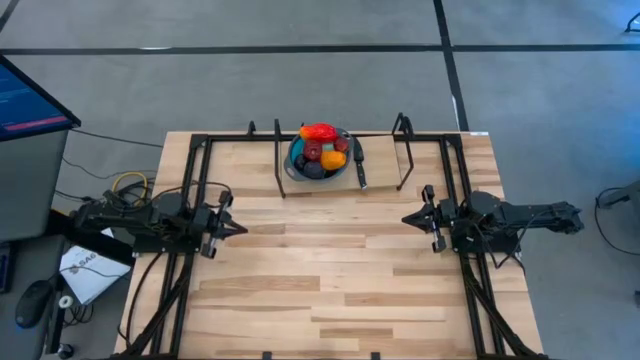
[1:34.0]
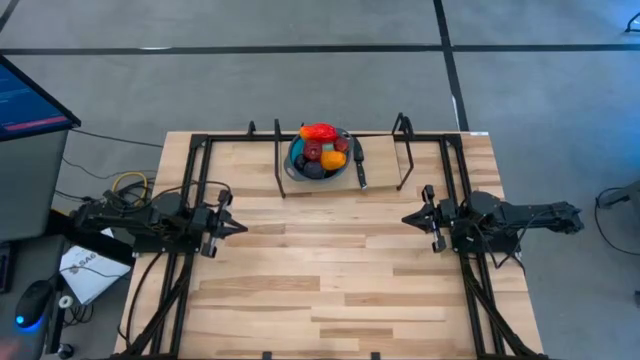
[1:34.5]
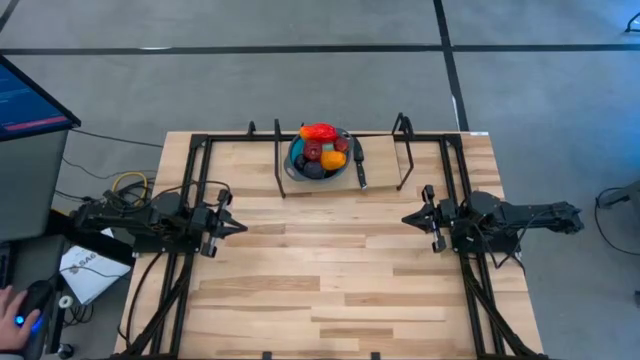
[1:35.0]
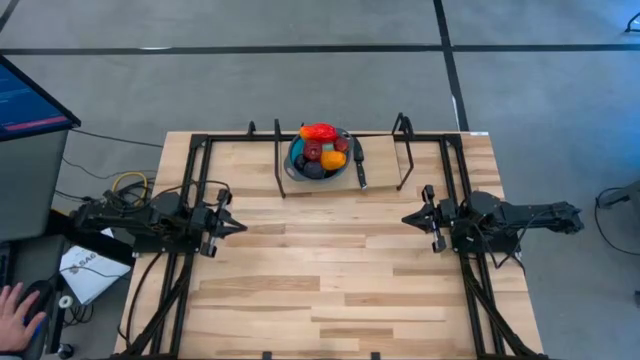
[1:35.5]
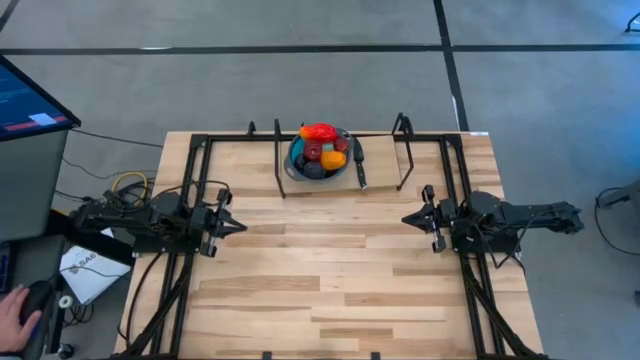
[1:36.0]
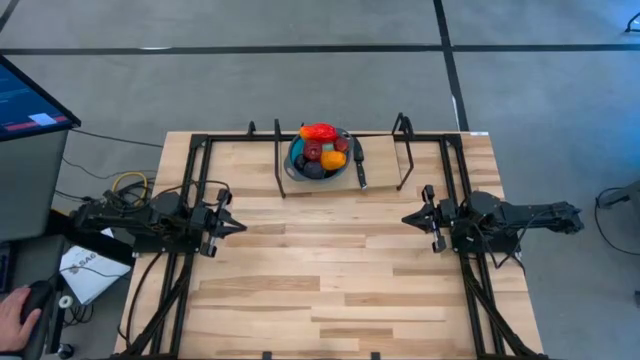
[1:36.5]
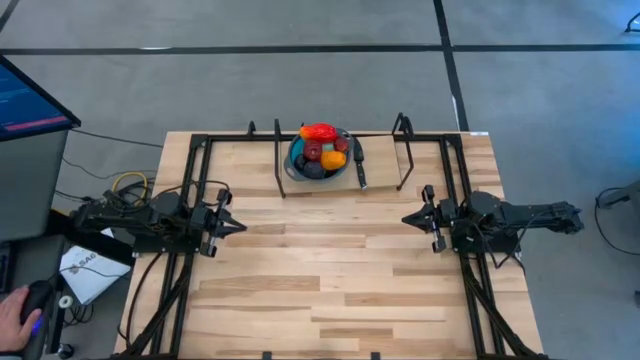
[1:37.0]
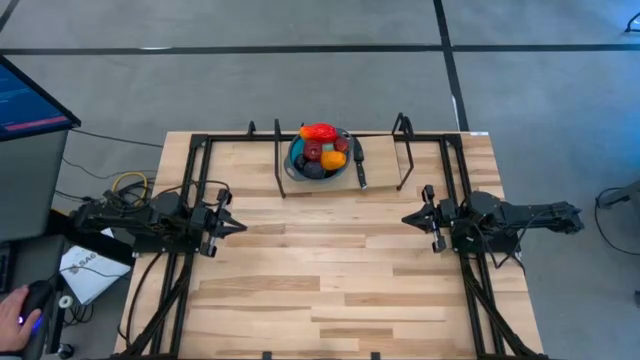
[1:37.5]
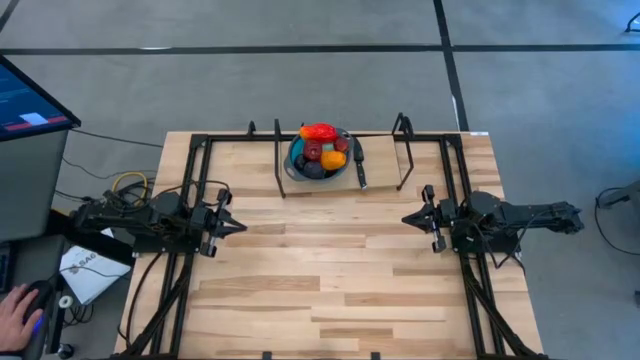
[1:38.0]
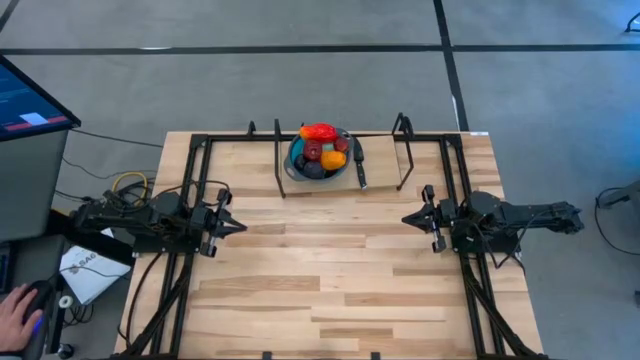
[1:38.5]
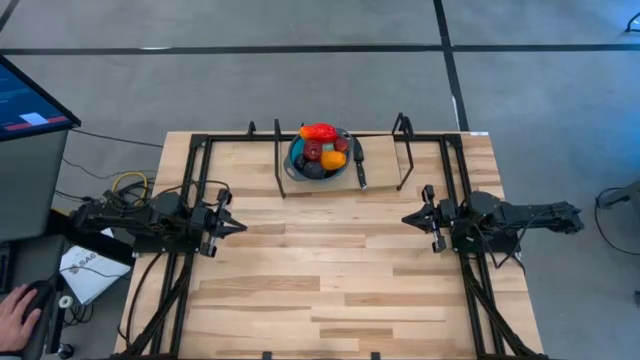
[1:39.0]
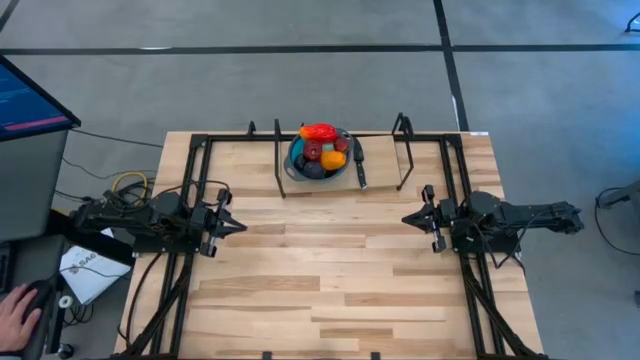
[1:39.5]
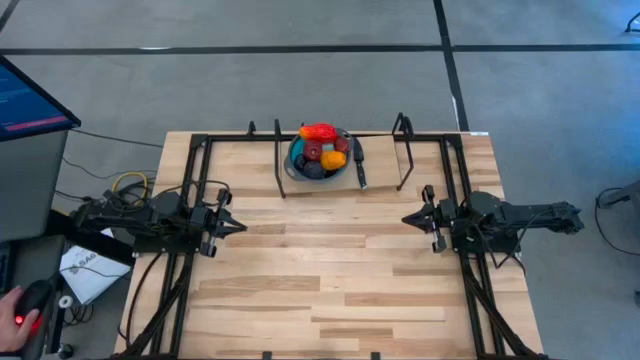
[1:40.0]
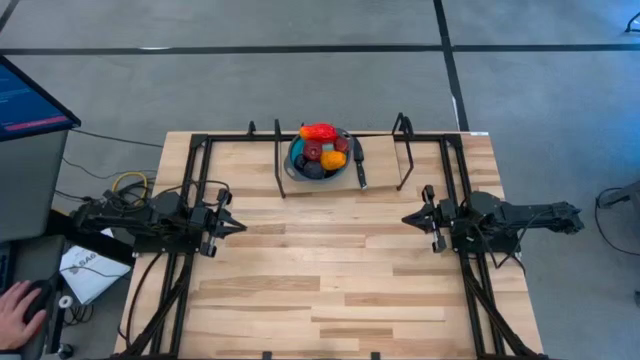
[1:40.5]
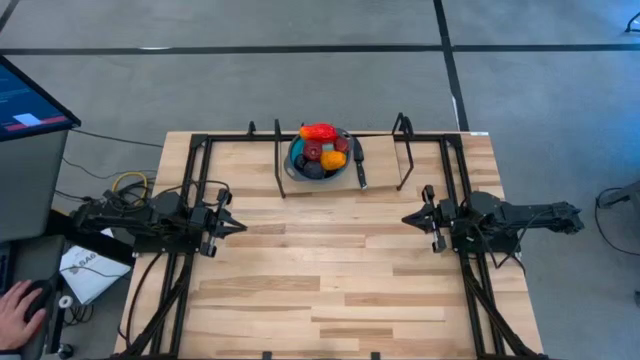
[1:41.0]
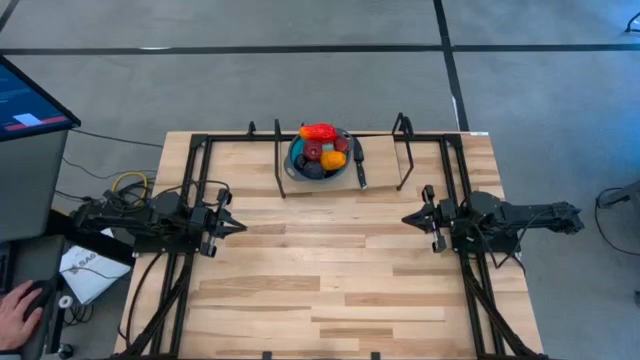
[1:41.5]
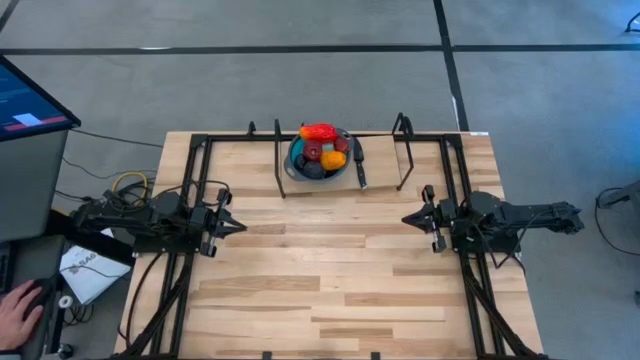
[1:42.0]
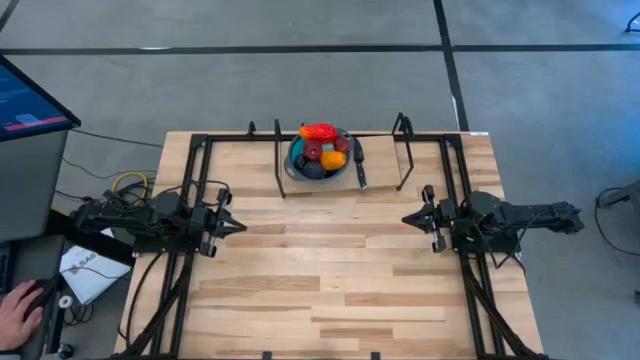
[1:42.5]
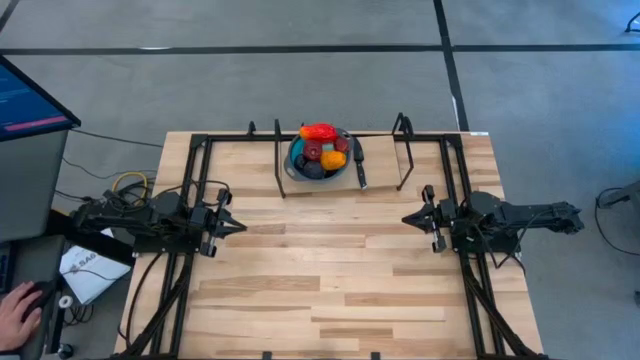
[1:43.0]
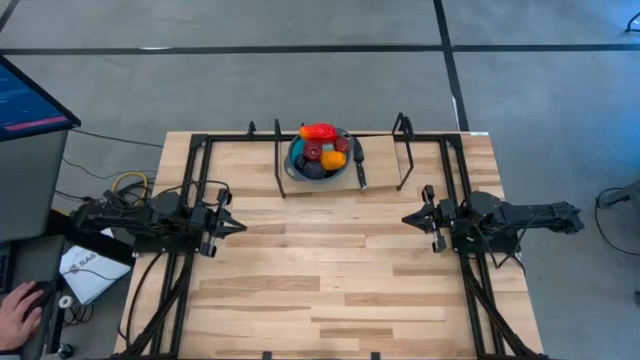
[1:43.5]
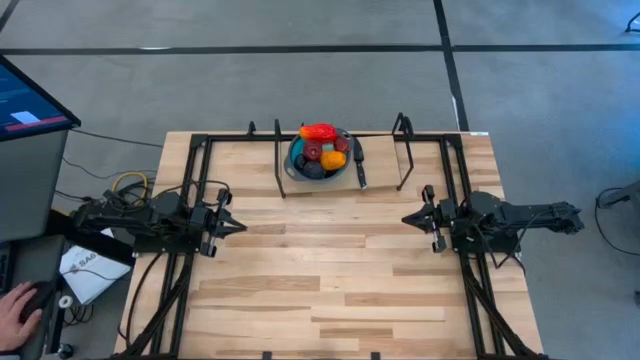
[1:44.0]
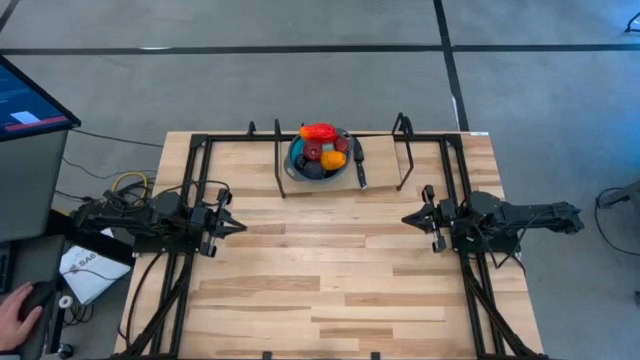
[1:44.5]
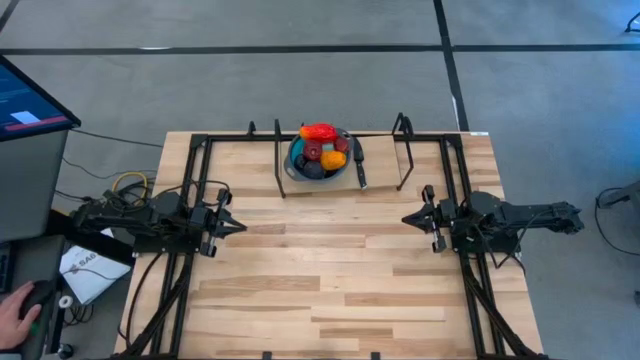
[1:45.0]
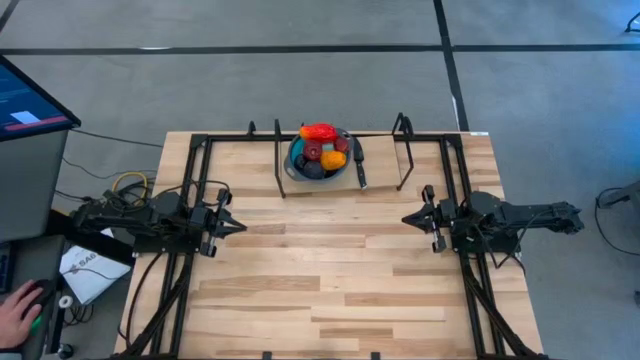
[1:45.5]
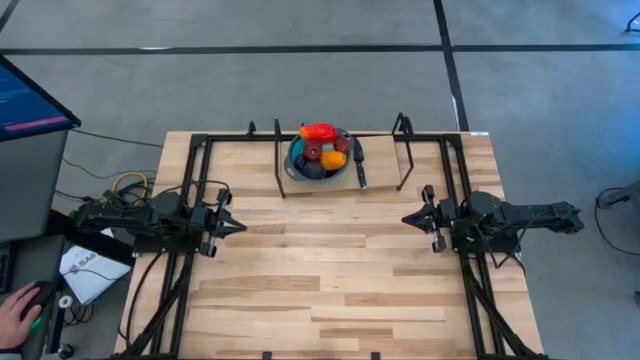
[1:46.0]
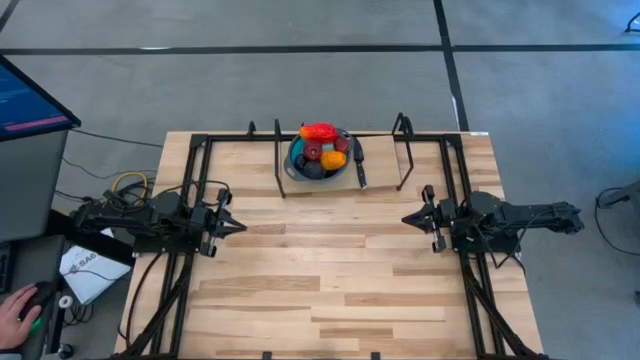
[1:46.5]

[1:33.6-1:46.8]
Task: Pick & Place Fruit
Return to Home Position

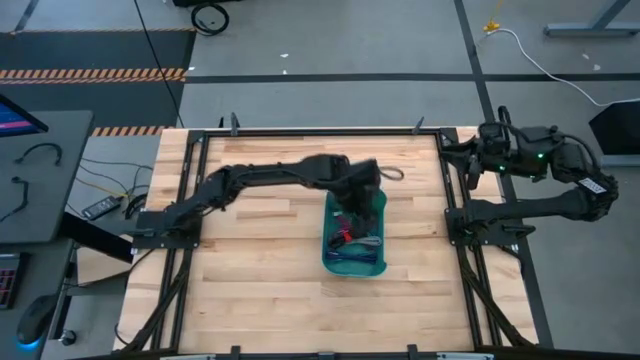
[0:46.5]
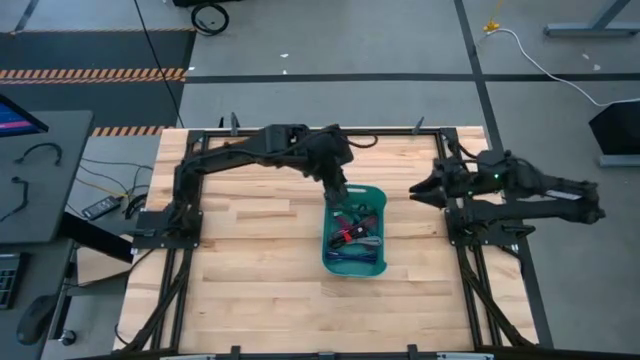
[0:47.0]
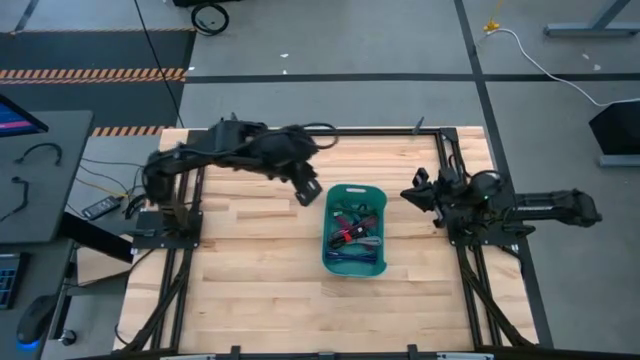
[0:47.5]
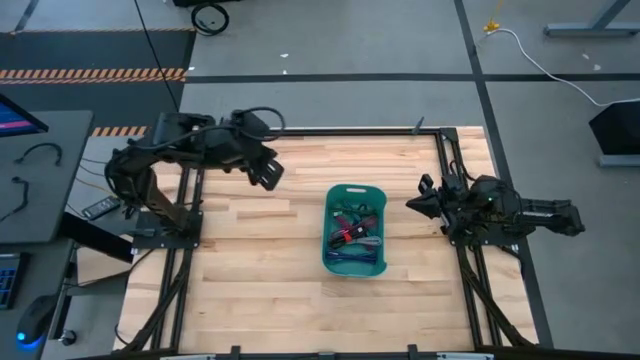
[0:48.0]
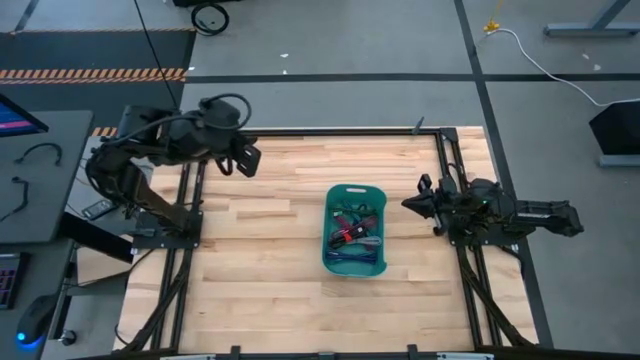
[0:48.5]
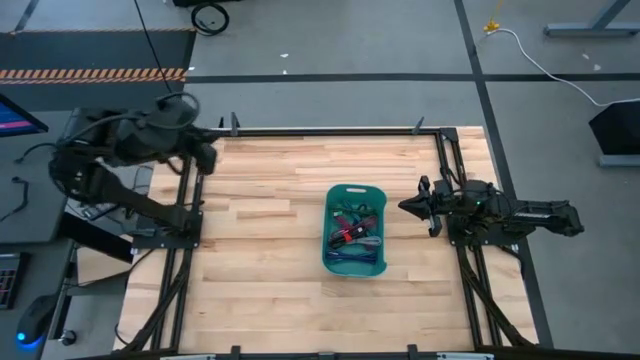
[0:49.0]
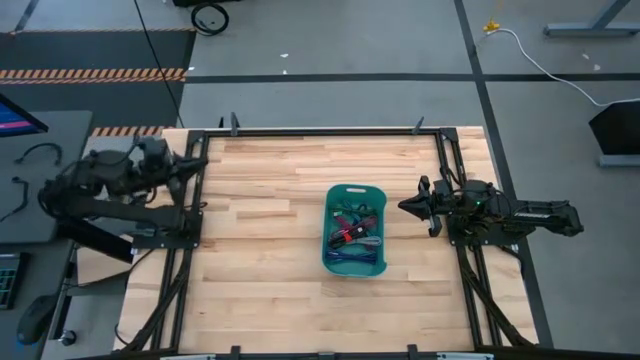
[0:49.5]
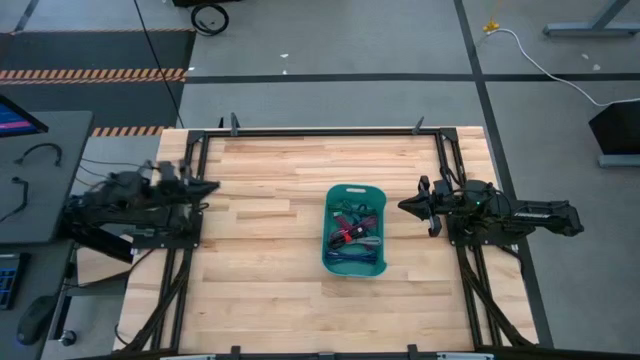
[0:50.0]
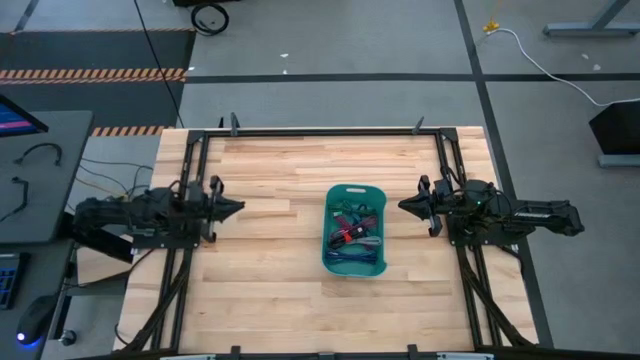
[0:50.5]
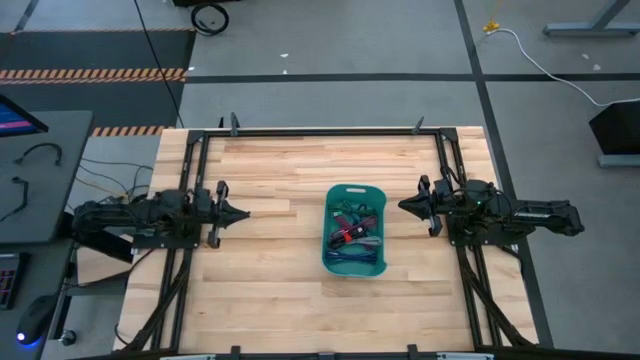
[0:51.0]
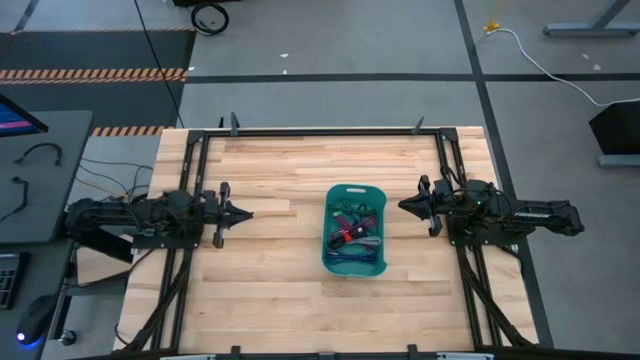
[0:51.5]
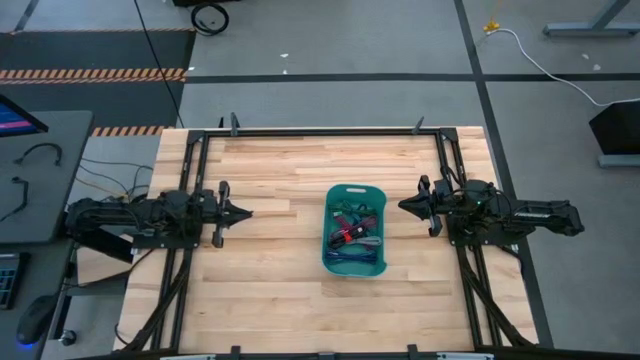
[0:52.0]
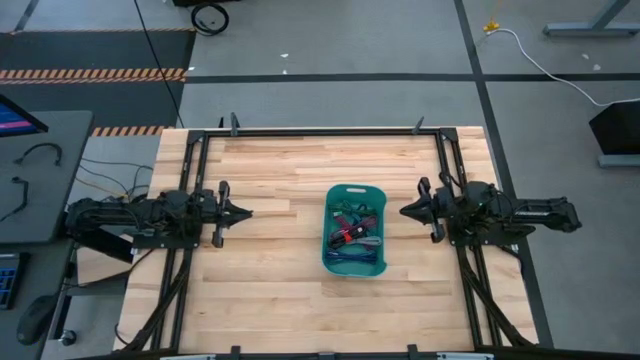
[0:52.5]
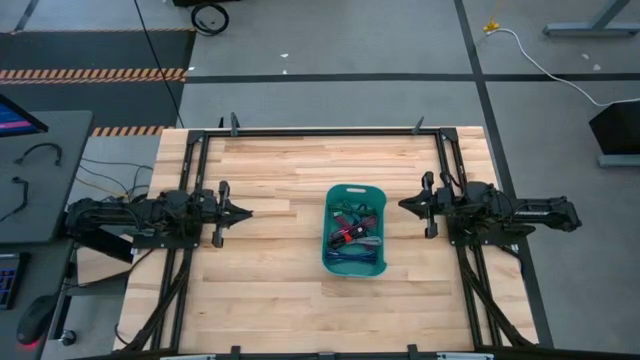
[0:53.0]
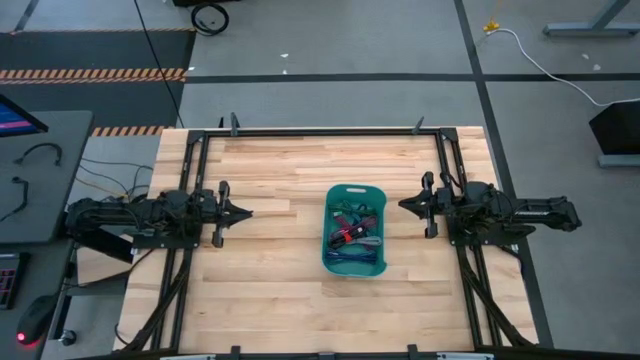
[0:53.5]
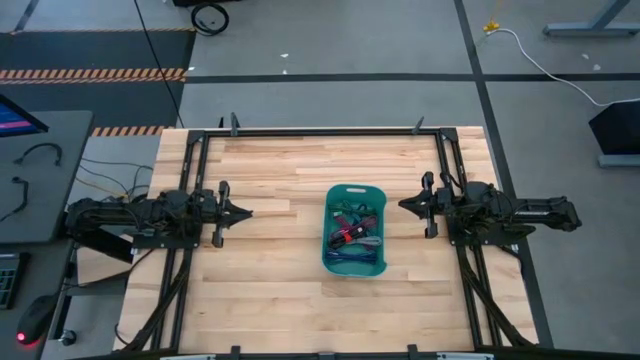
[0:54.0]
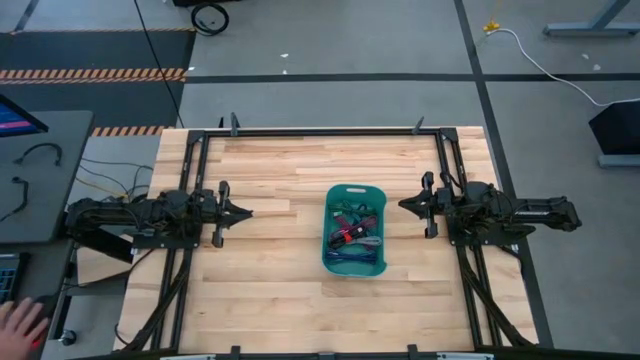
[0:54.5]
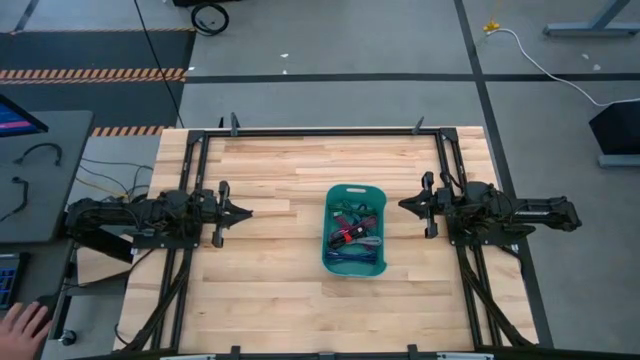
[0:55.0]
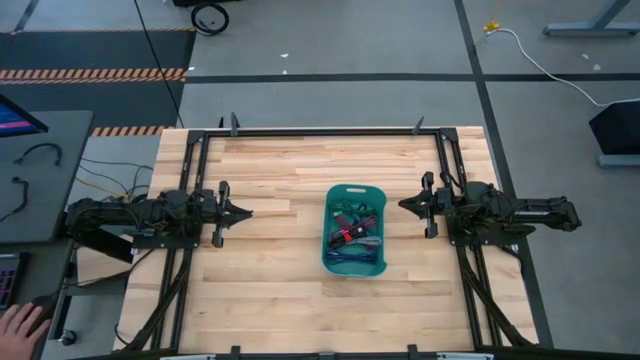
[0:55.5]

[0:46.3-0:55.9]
Task: Pick and place USB-C Cables
Return to Home Position
